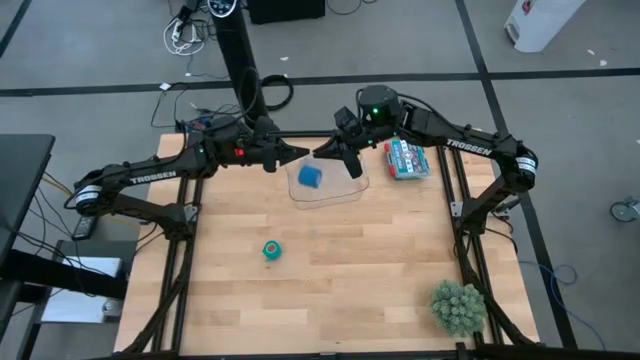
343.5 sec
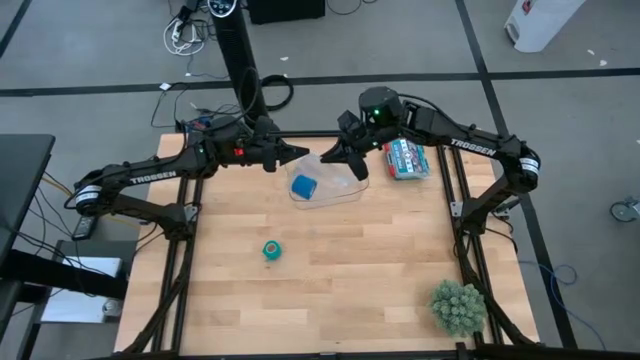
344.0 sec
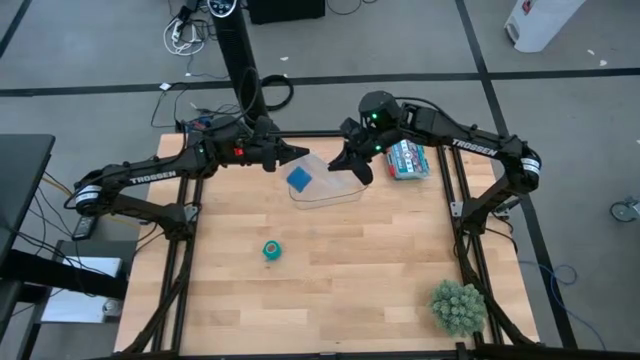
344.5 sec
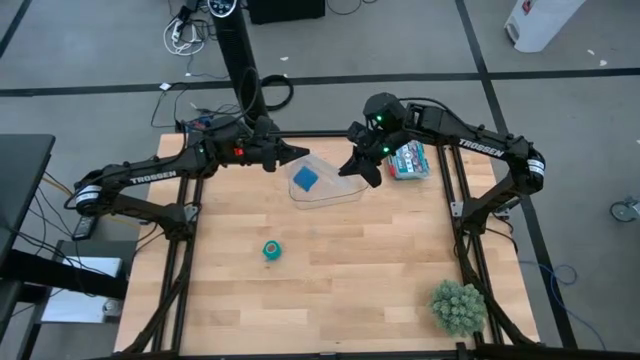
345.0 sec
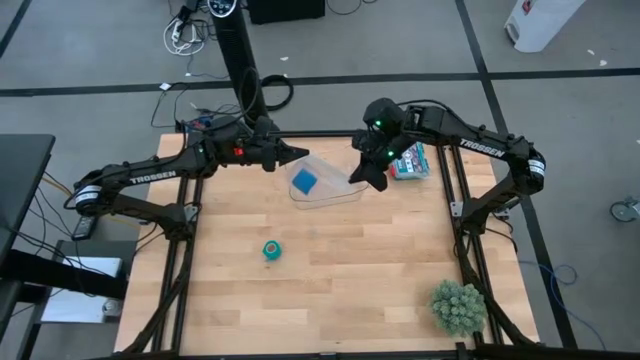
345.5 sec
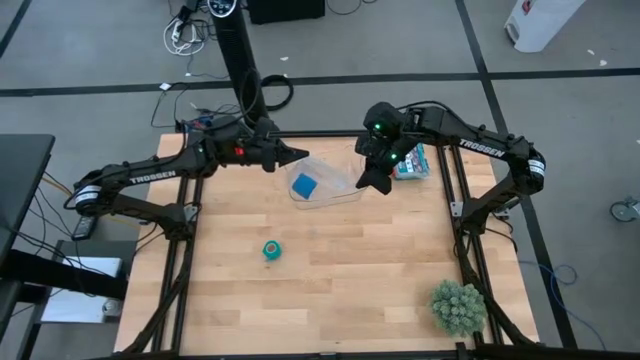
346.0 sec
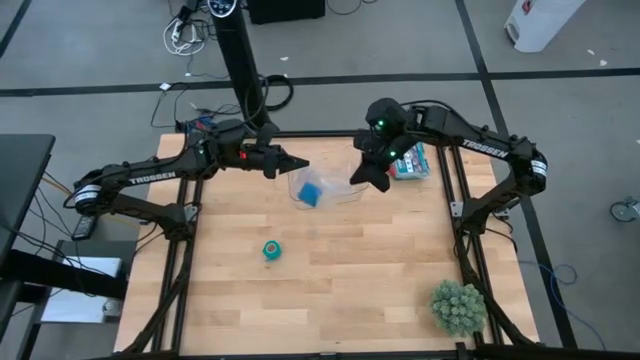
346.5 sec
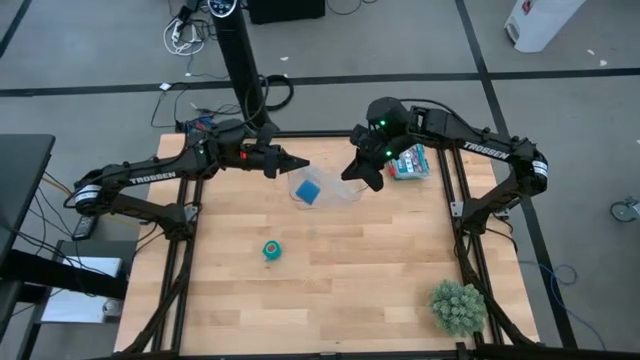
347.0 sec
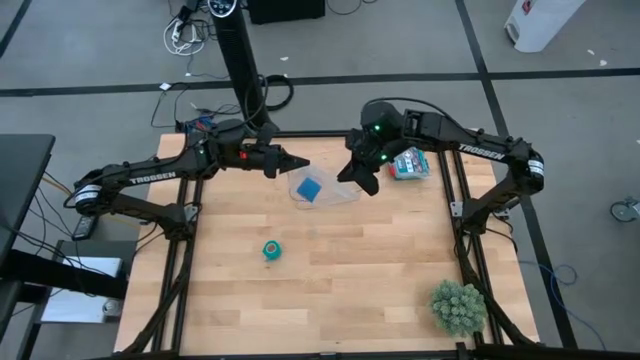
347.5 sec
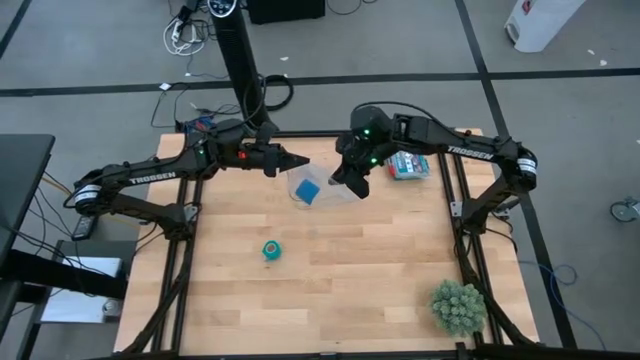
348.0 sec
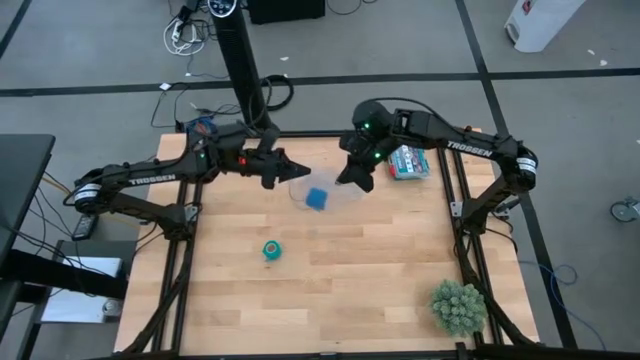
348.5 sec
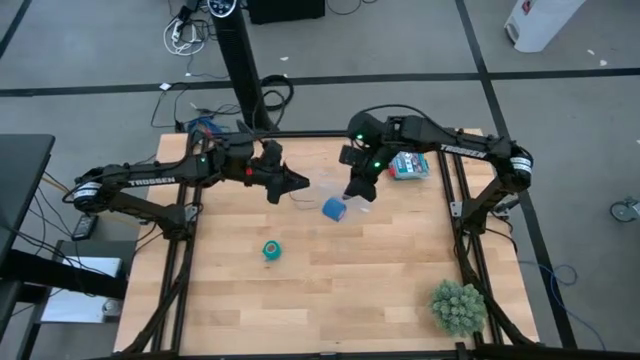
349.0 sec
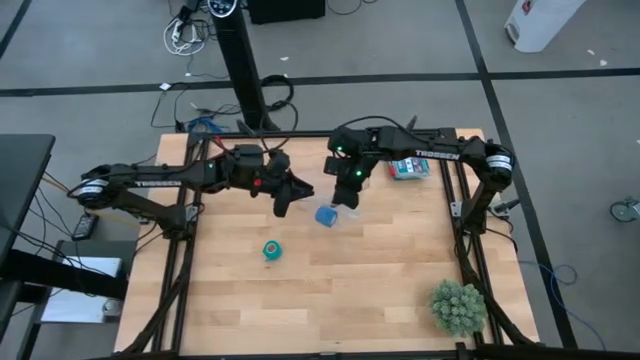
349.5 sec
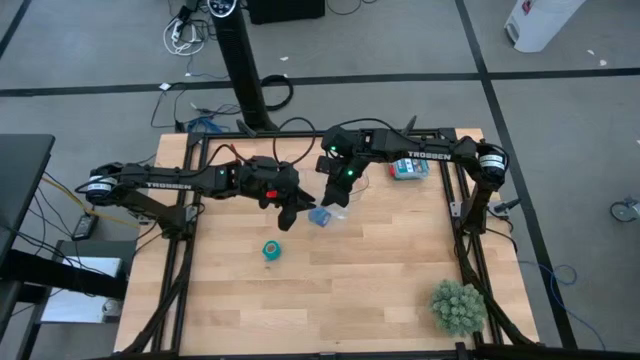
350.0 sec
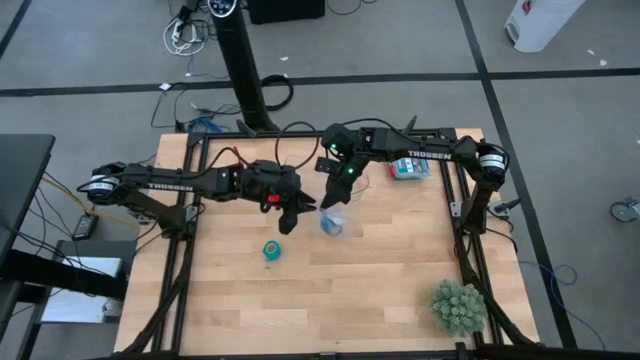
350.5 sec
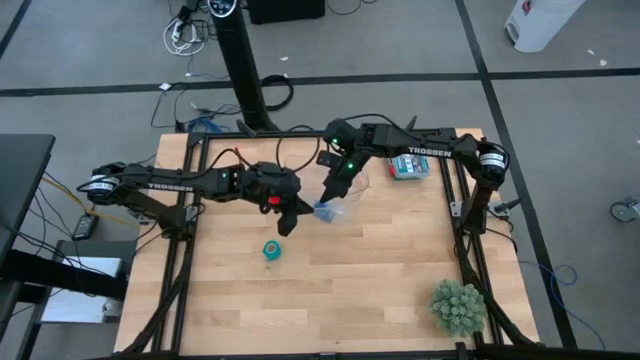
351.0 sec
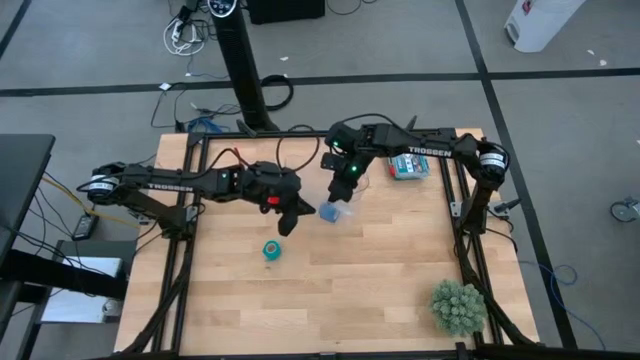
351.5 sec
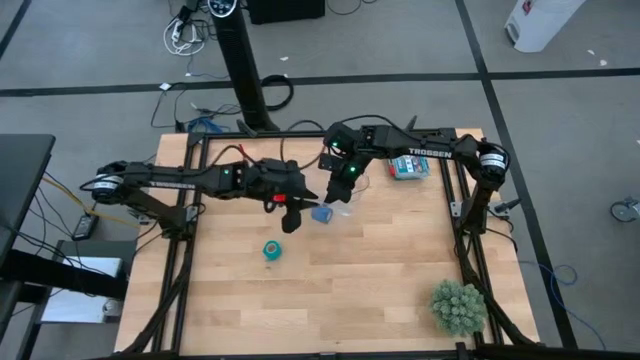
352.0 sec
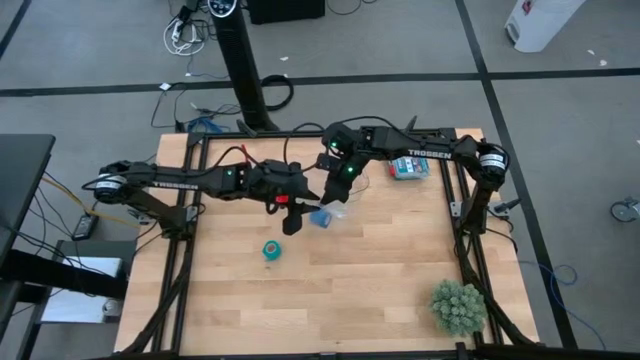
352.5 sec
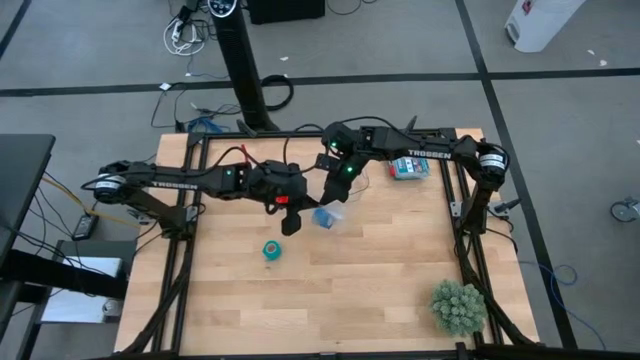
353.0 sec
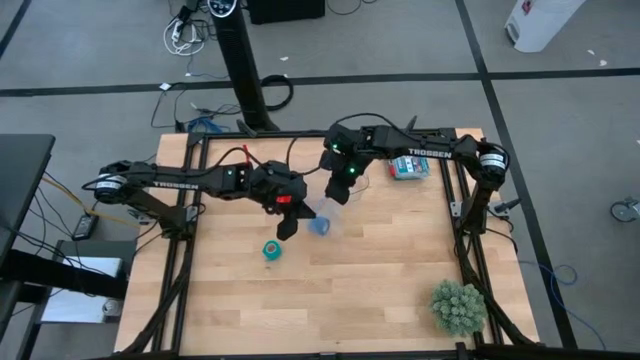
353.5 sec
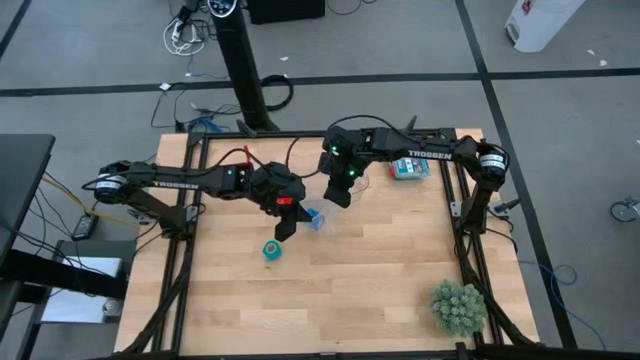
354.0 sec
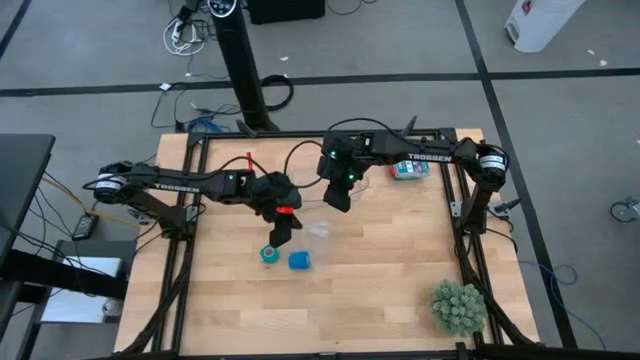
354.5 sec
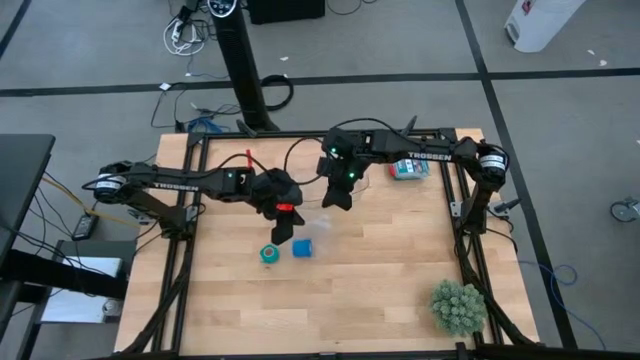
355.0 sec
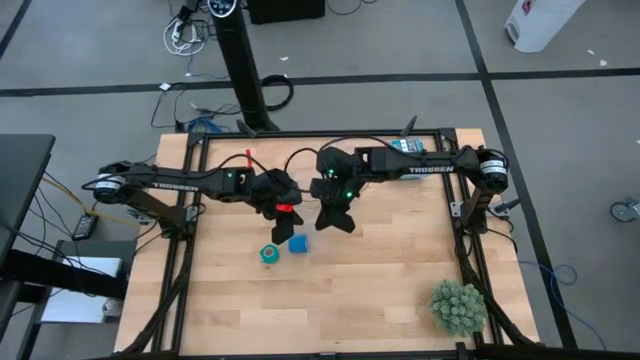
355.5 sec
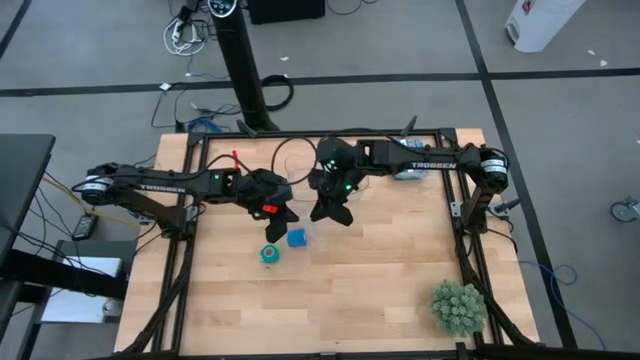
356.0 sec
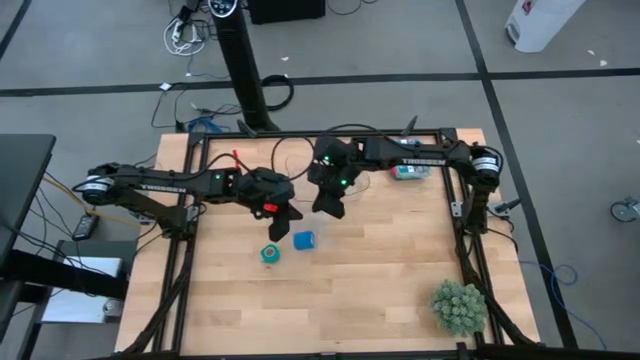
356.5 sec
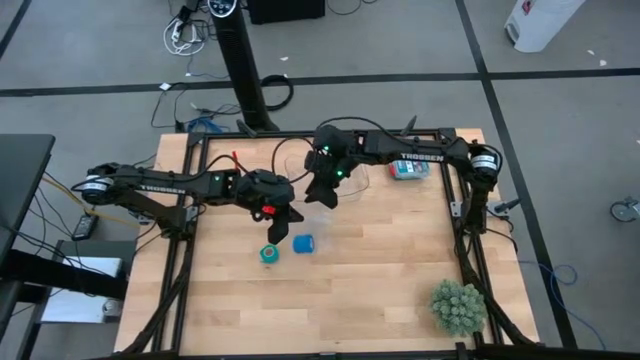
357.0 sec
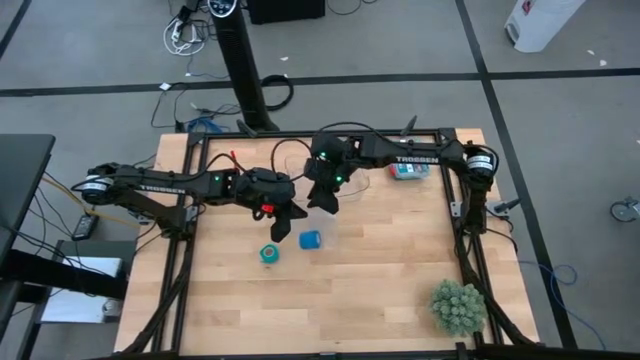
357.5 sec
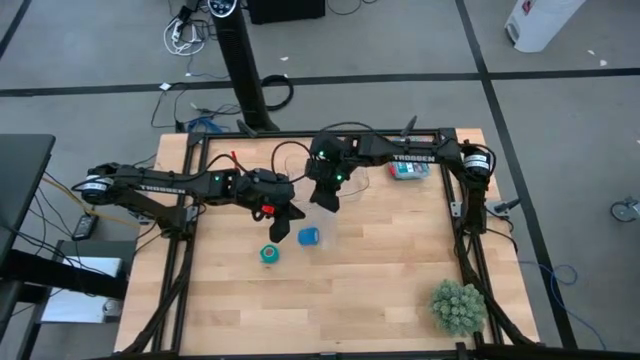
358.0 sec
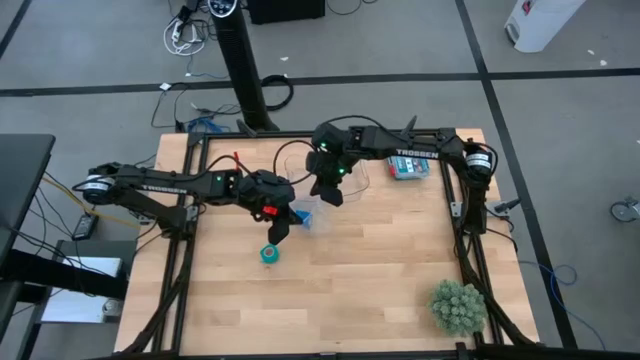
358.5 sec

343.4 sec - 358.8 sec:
Task: Roll bandage
Open the transparent zip bag

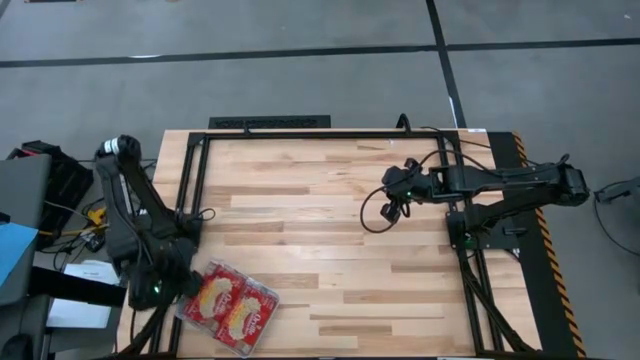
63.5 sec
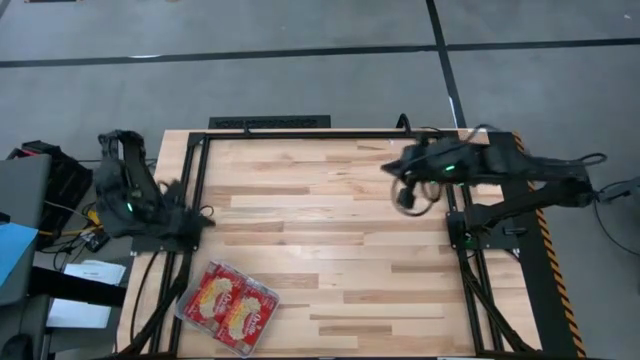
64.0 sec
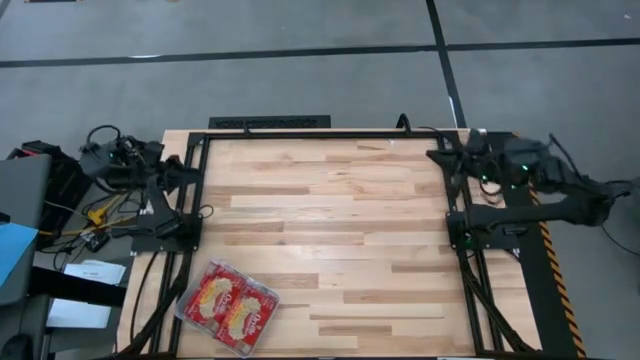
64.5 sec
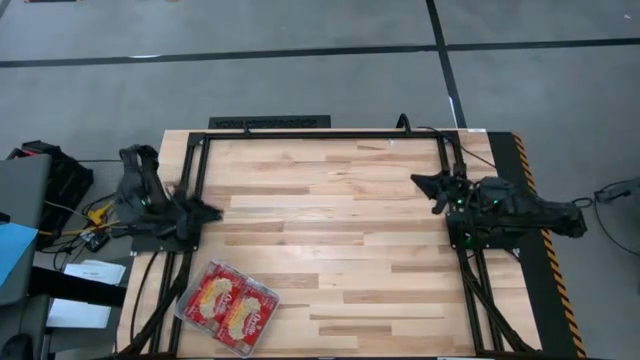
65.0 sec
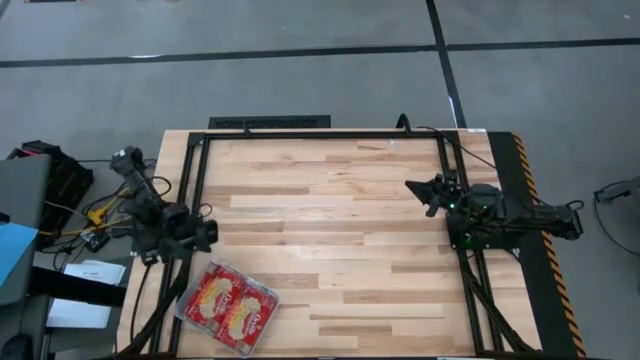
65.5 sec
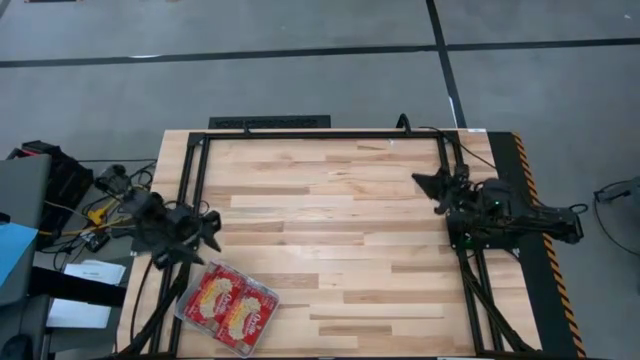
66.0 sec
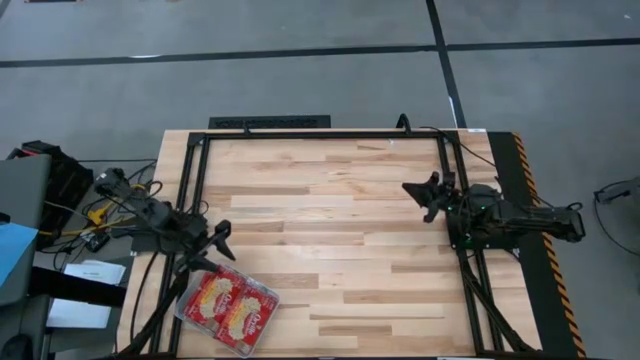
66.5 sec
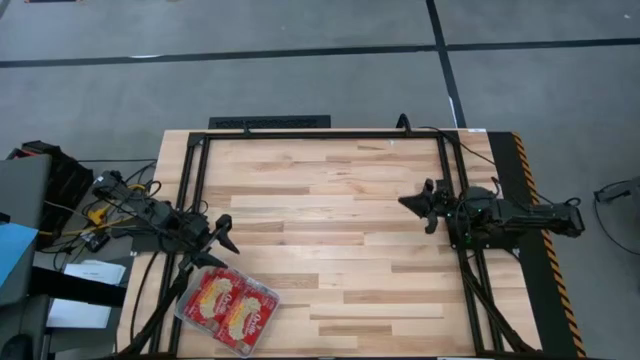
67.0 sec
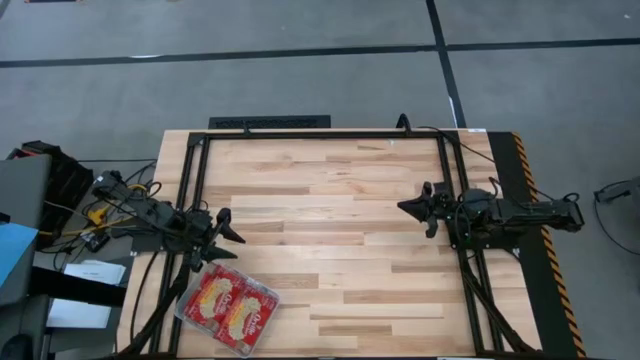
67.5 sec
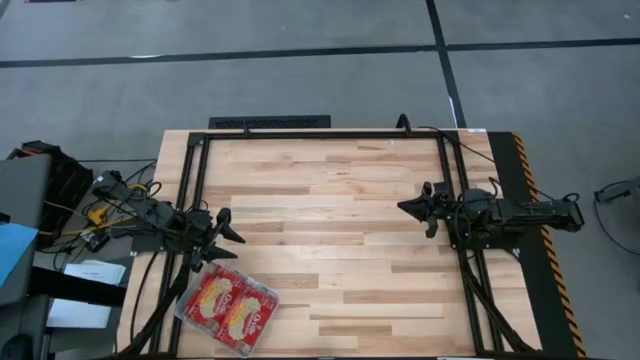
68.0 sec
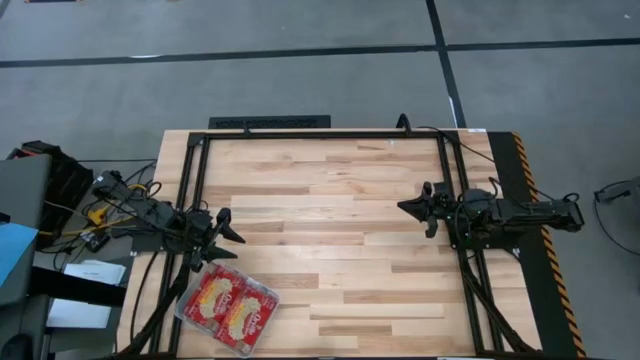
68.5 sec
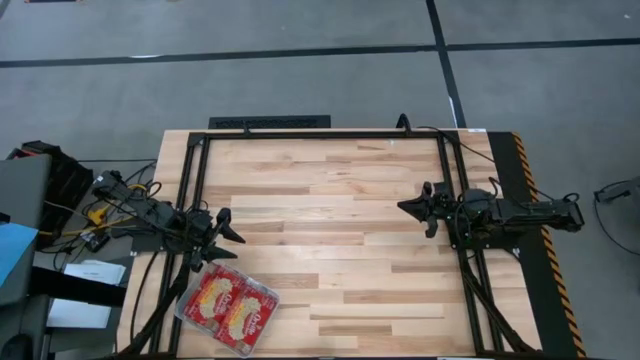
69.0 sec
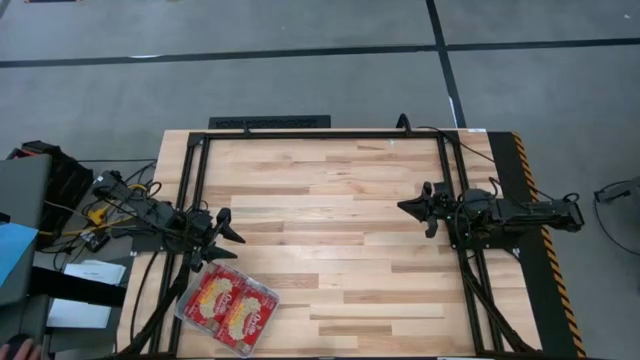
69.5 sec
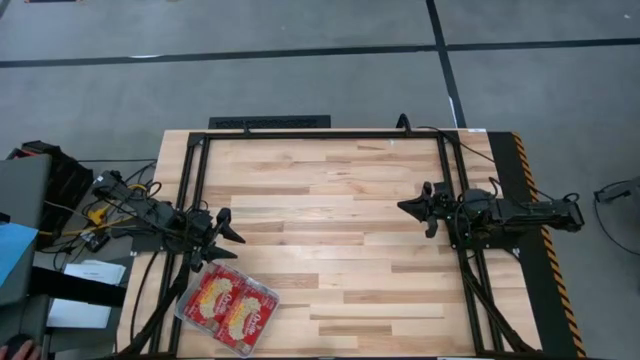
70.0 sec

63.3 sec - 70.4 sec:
Task: Sort popcorn bags into baskets
Return to Home Position
